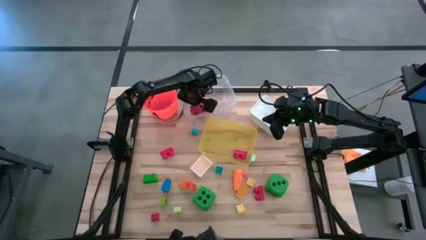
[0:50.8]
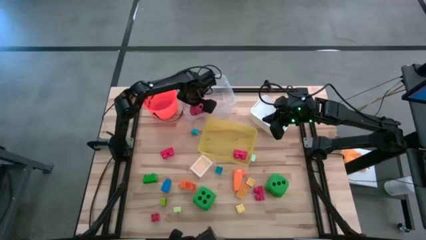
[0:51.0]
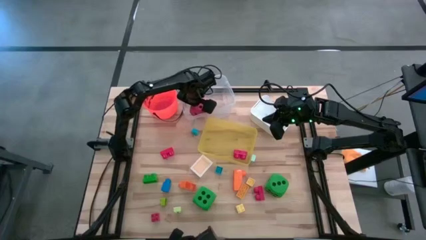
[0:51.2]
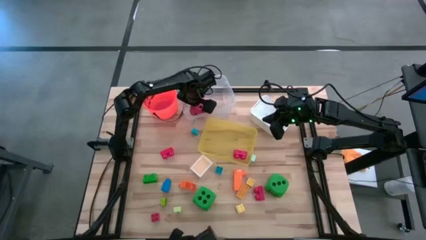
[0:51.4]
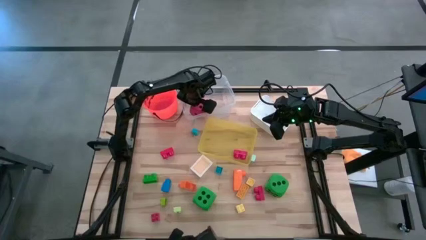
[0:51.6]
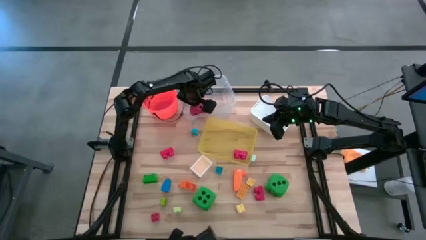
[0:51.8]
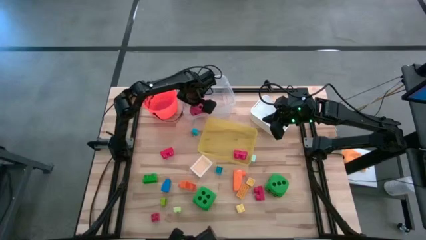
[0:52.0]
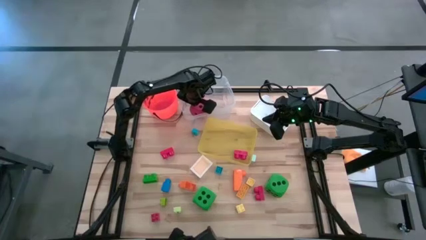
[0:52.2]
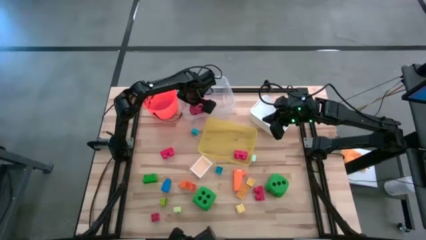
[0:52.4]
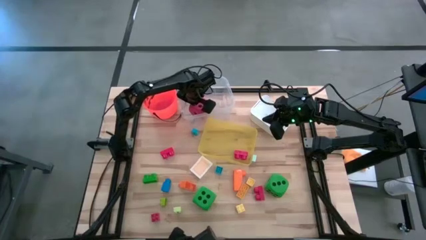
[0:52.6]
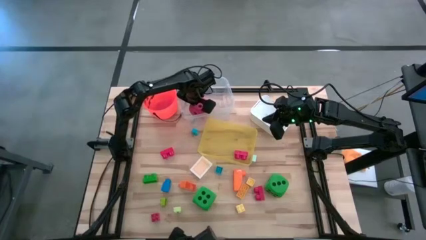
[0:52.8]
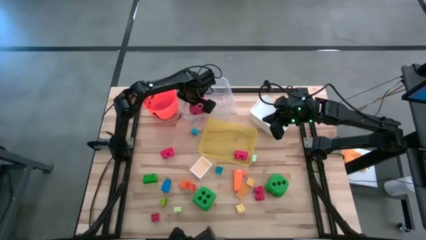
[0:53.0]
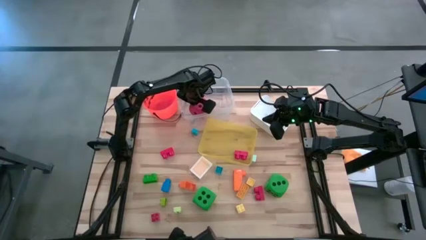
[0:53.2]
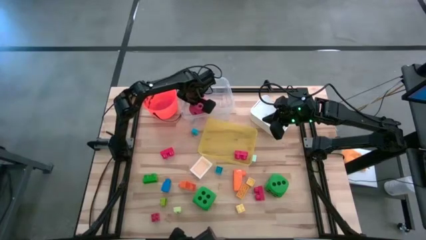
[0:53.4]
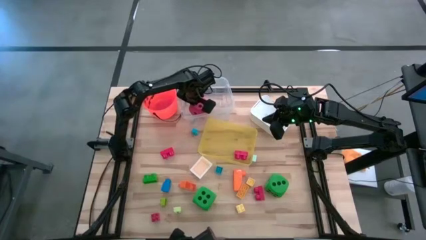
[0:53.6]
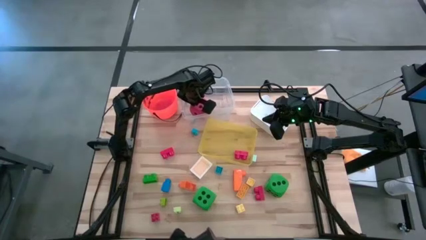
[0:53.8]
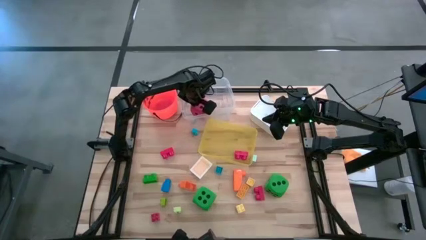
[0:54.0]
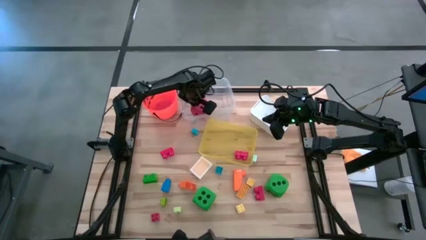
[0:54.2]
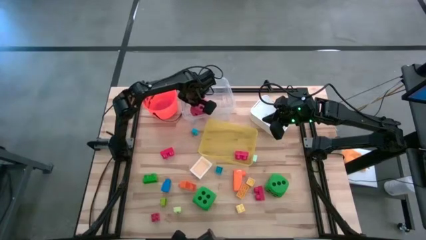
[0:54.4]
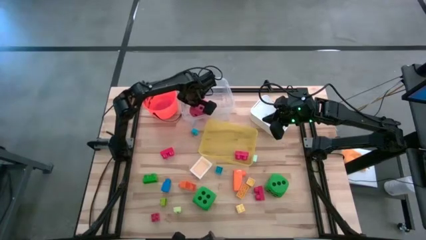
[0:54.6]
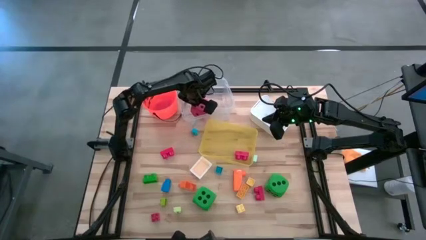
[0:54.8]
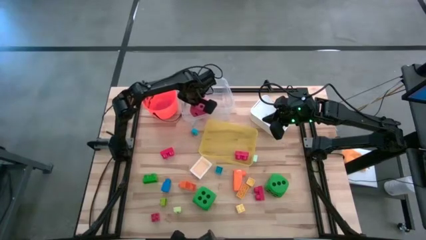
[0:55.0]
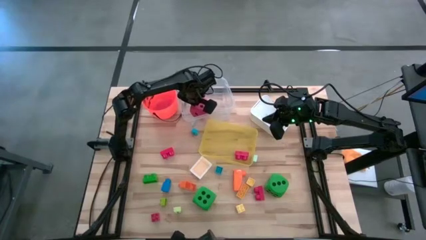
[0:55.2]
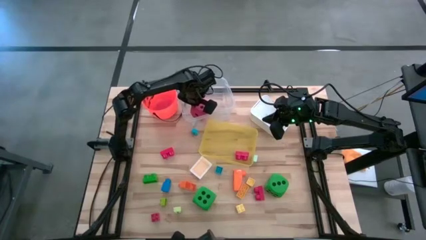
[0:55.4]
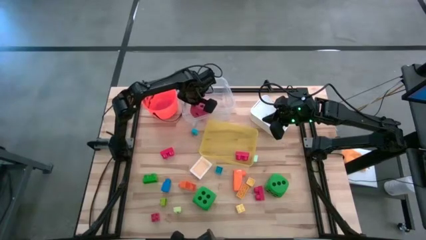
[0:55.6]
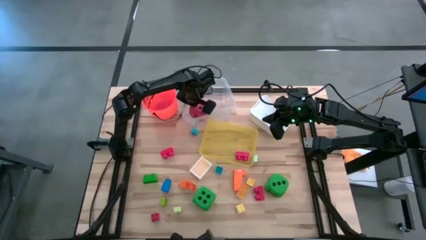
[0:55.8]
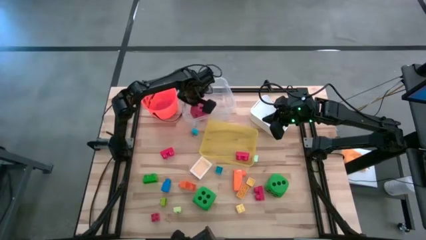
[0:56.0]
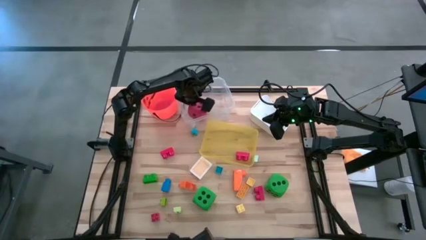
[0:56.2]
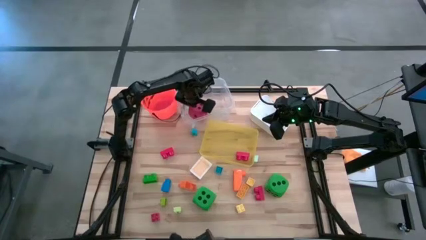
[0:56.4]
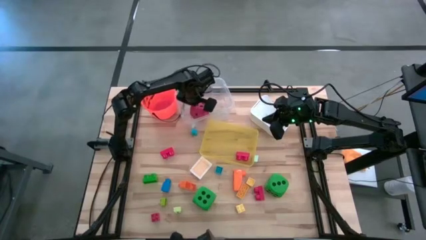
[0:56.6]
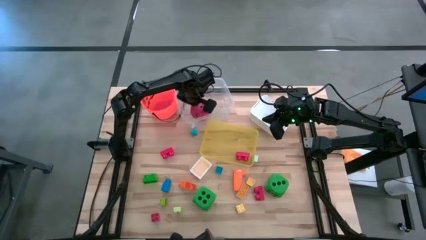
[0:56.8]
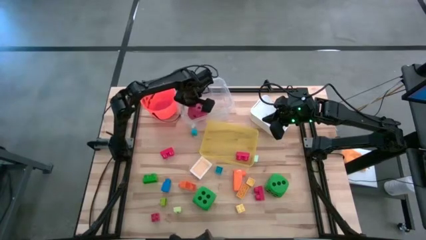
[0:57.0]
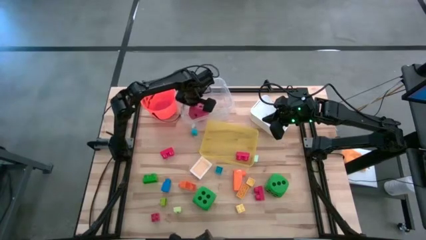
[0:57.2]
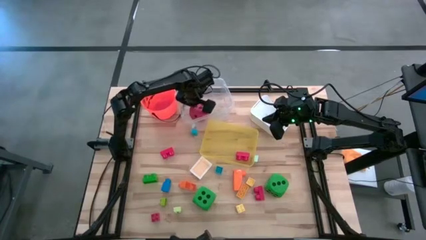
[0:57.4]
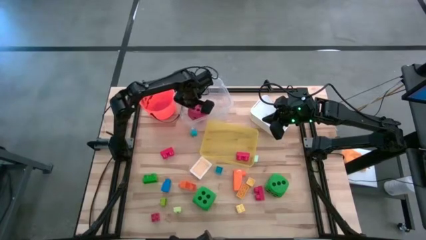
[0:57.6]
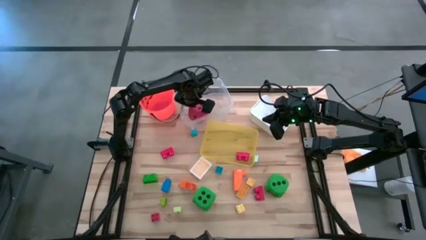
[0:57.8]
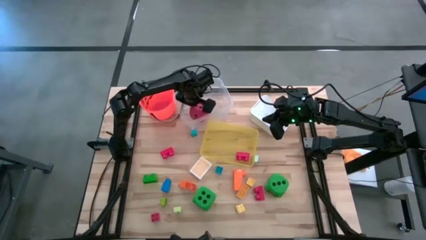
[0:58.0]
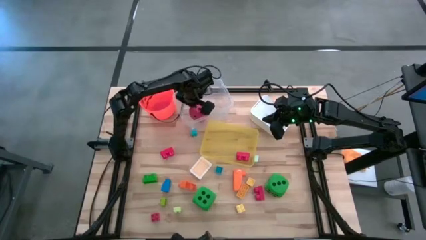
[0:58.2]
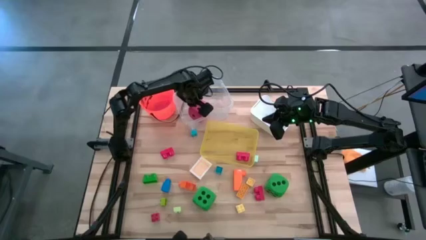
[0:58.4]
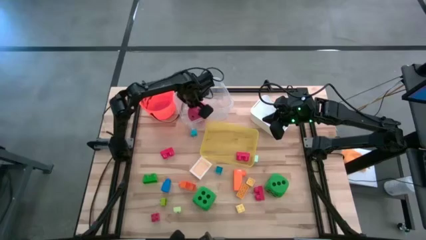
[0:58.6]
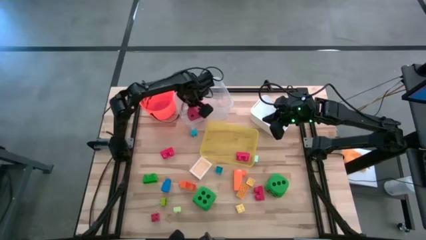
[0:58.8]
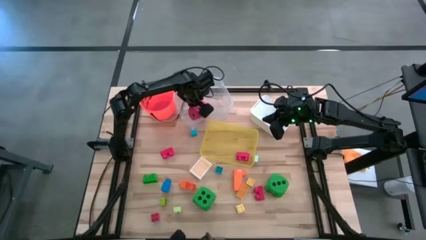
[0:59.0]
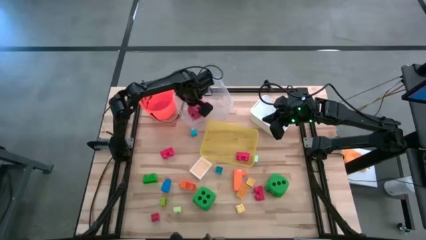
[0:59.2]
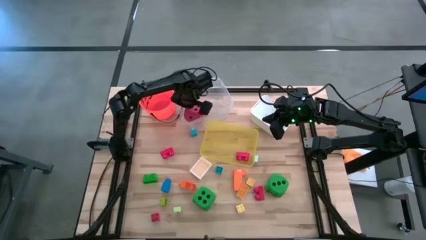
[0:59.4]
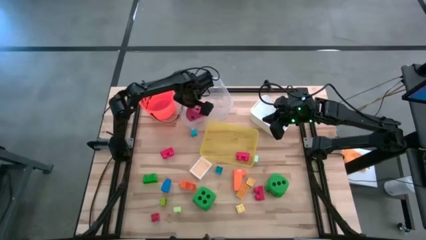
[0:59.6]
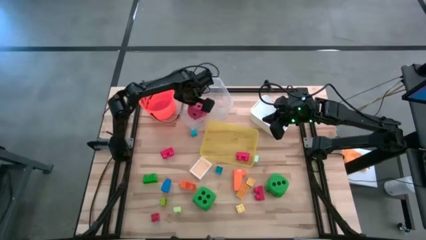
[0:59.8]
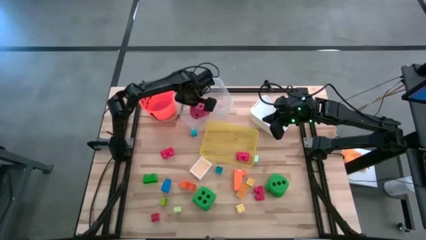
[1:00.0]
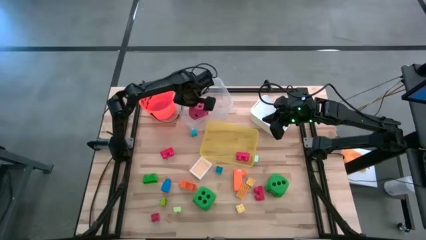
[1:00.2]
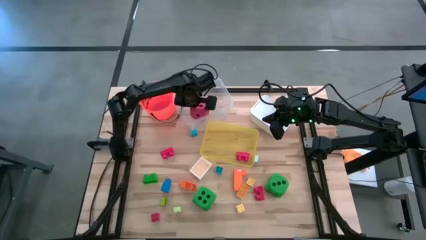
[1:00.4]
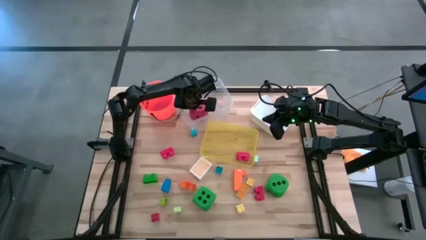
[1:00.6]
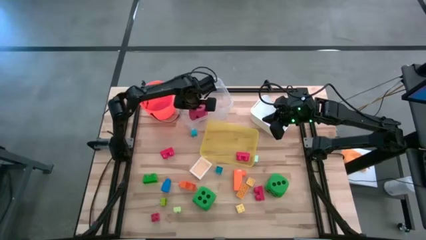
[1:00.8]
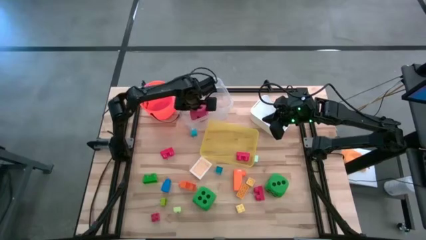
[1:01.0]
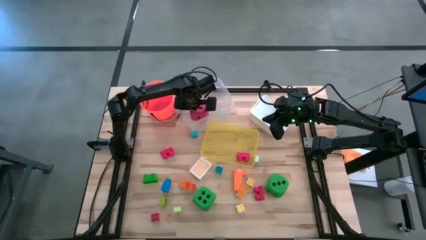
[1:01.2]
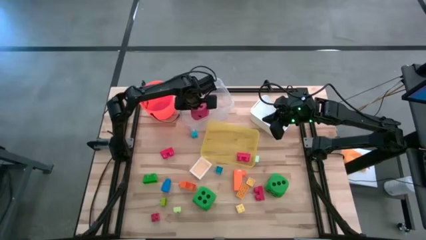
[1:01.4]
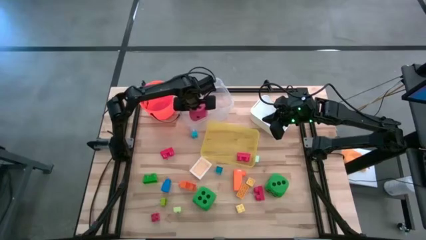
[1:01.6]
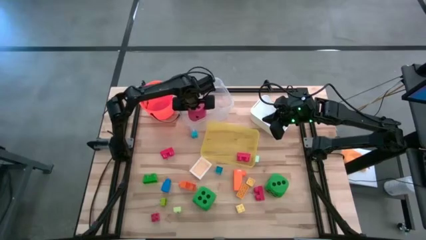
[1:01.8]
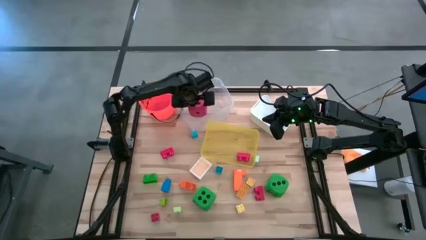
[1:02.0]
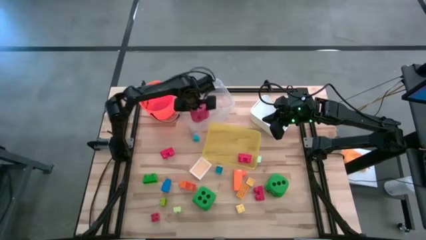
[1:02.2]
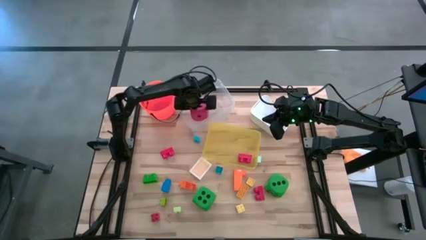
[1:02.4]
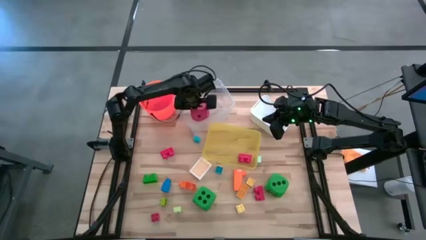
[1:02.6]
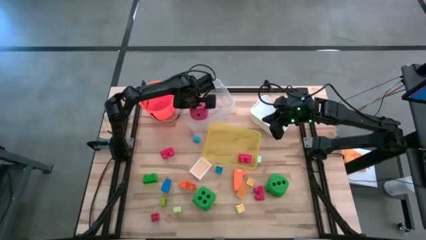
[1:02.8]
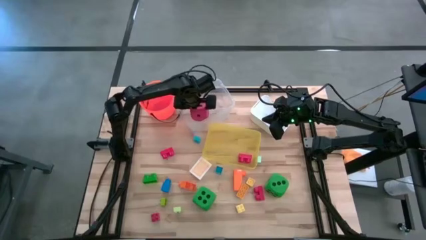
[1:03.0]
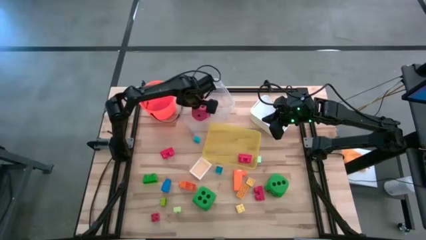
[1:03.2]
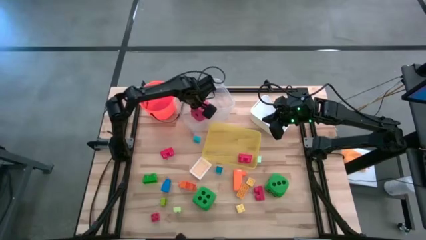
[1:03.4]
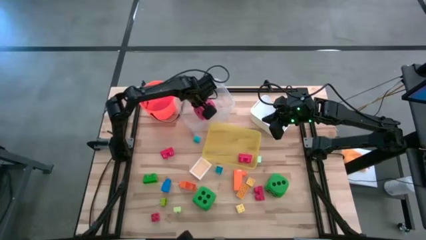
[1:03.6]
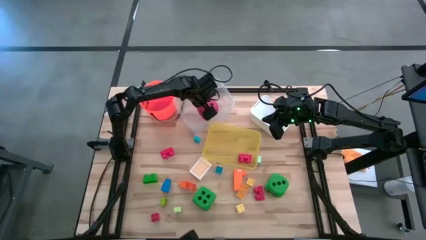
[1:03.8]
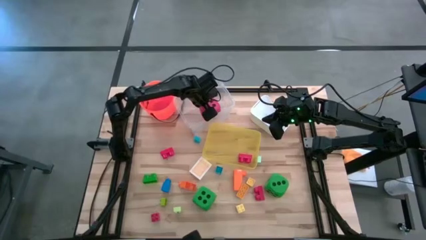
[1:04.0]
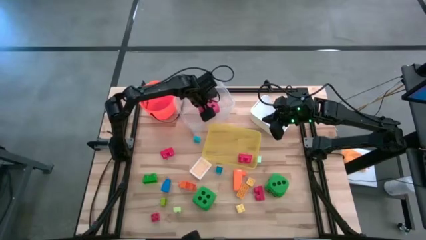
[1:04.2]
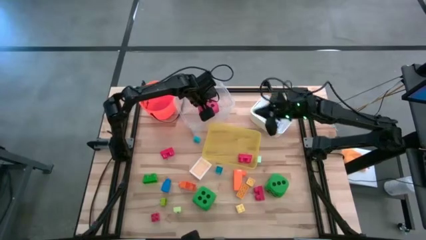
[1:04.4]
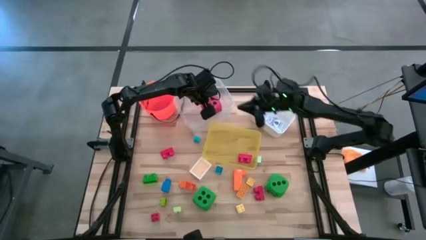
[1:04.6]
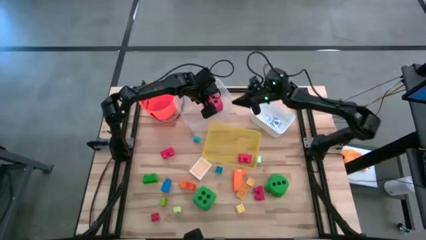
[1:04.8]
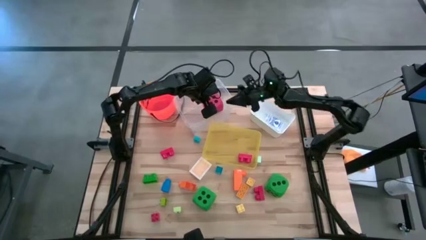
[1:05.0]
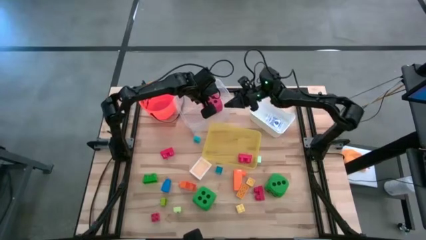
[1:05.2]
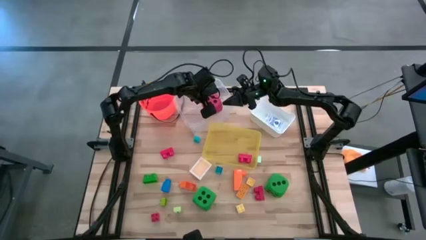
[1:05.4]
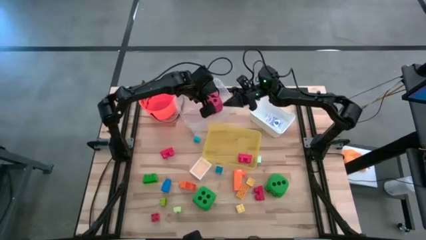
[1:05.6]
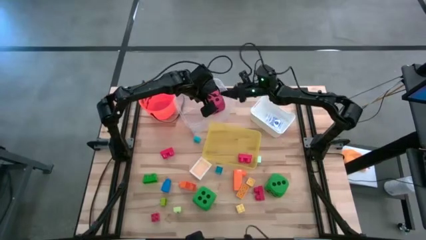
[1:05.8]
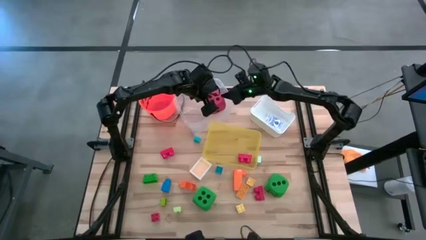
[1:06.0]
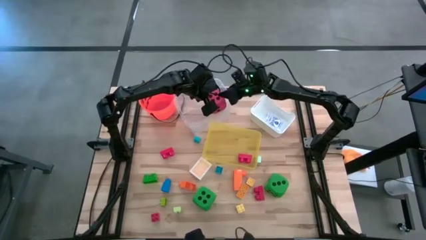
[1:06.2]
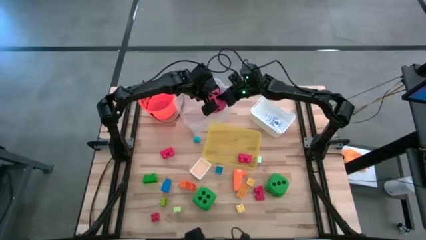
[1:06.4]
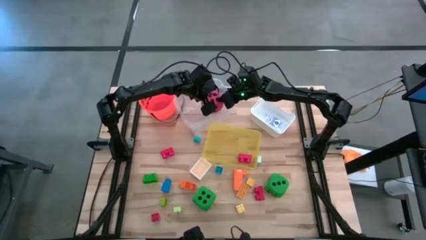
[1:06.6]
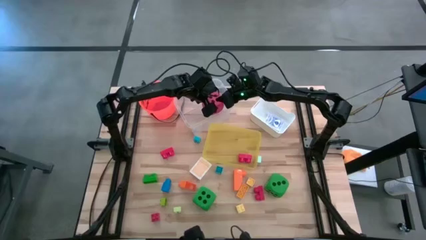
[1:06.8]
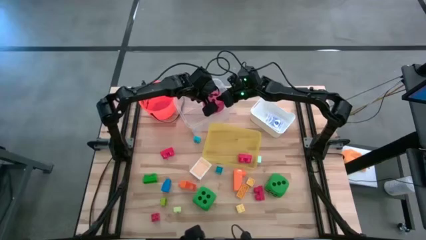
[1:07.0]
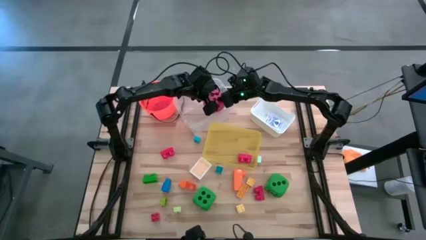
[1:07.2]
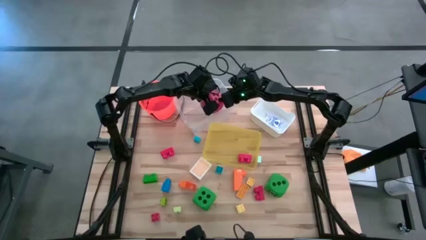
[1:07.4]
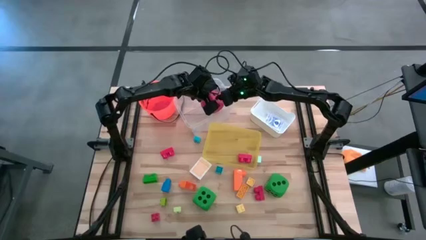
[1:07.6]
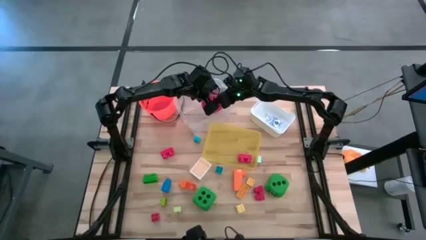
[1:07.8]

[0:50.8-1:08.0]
Task: Pick & Place Toys
Put the red dice into the transparent bin
